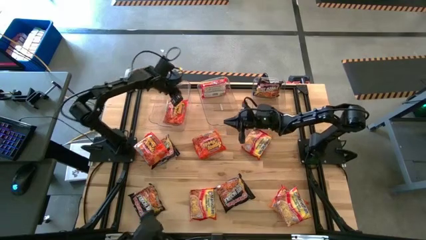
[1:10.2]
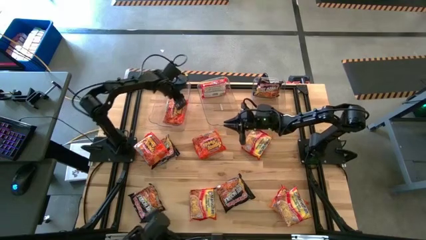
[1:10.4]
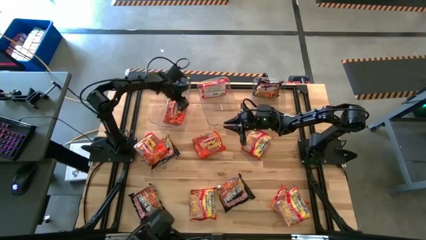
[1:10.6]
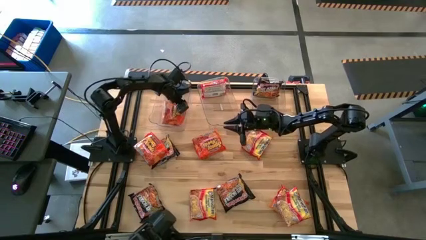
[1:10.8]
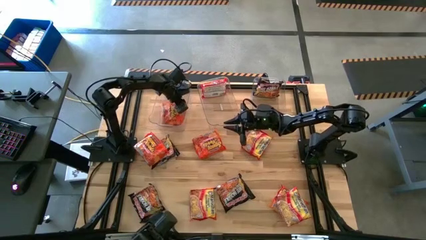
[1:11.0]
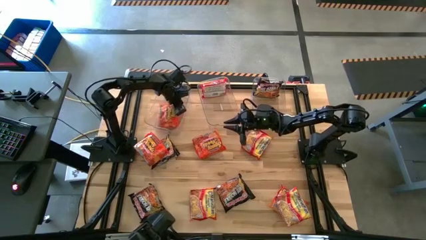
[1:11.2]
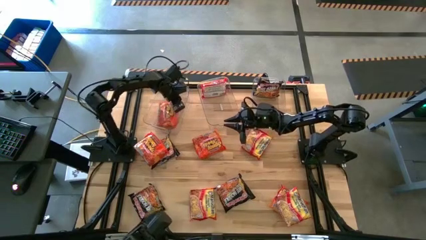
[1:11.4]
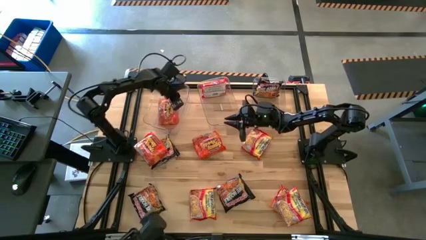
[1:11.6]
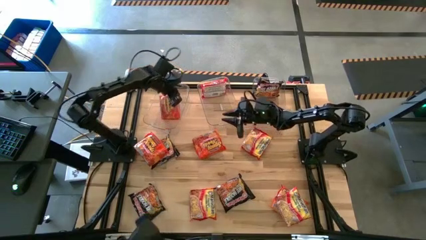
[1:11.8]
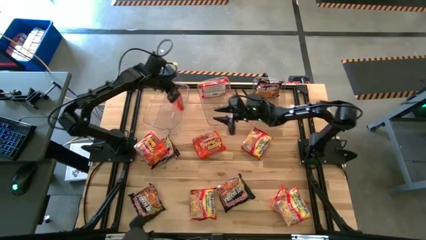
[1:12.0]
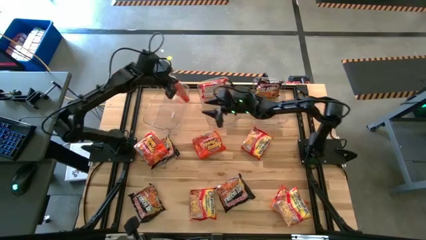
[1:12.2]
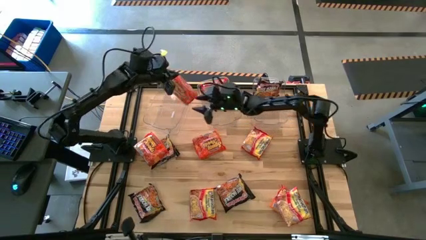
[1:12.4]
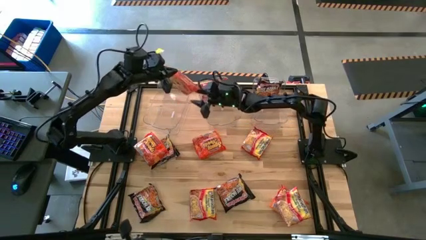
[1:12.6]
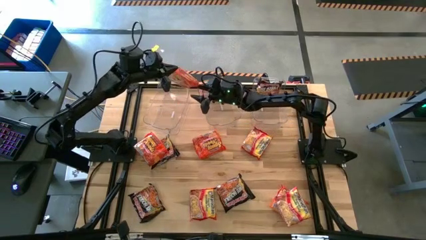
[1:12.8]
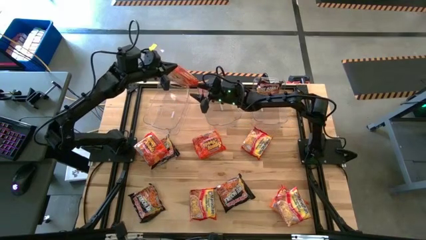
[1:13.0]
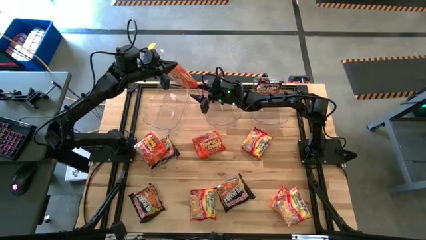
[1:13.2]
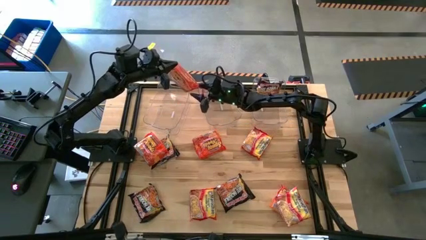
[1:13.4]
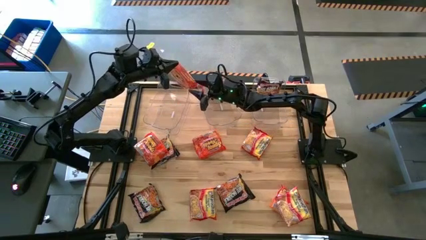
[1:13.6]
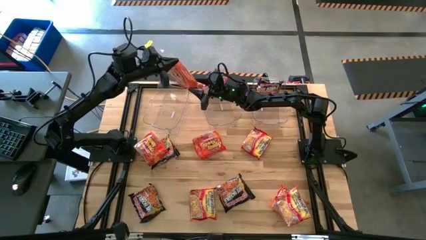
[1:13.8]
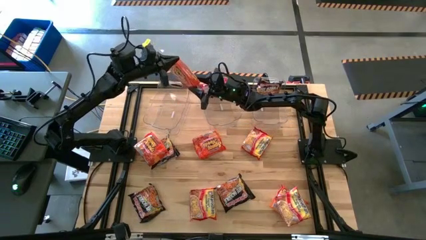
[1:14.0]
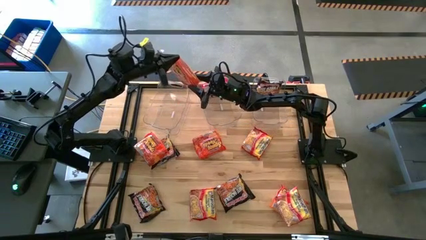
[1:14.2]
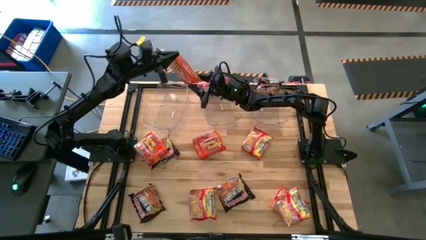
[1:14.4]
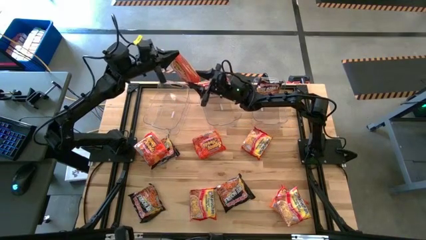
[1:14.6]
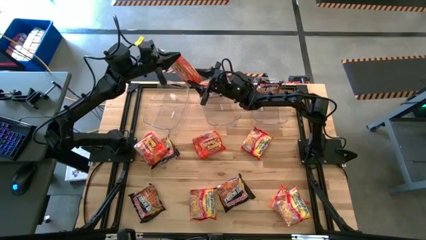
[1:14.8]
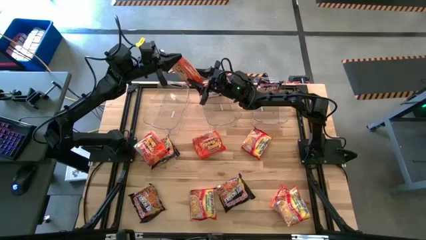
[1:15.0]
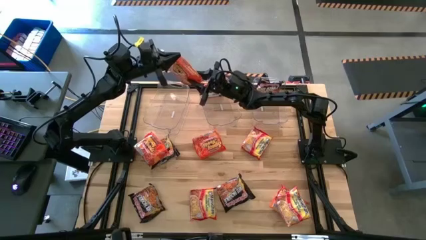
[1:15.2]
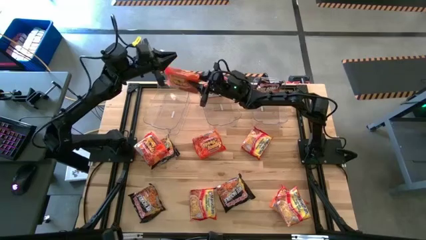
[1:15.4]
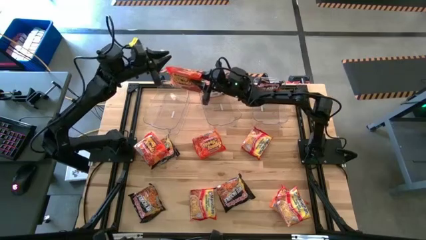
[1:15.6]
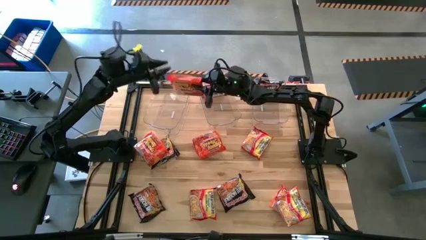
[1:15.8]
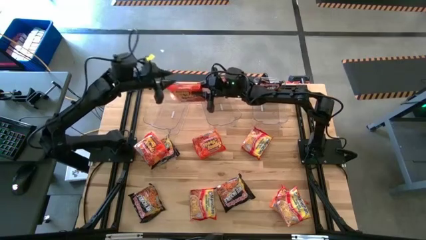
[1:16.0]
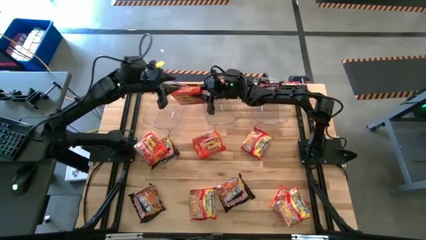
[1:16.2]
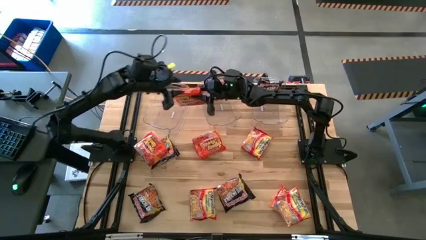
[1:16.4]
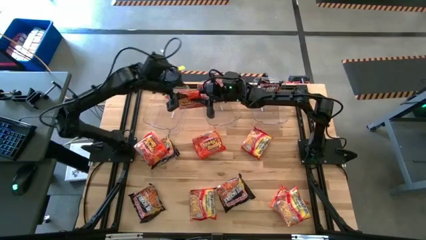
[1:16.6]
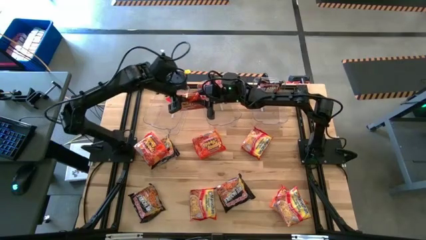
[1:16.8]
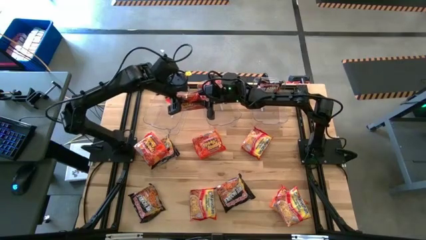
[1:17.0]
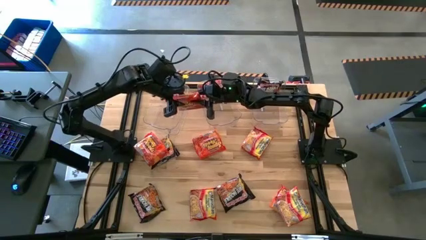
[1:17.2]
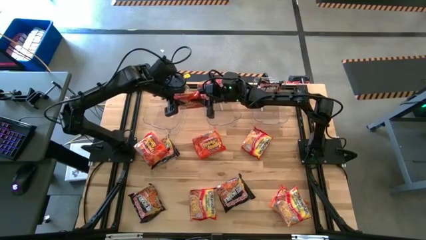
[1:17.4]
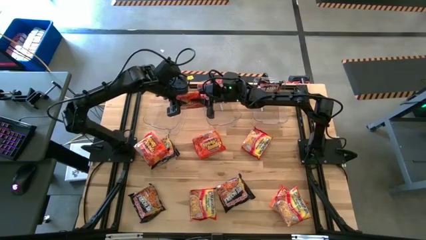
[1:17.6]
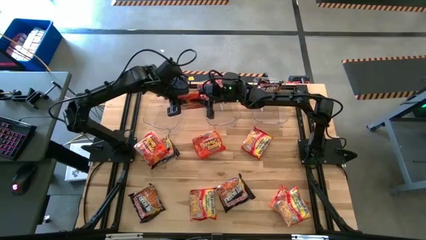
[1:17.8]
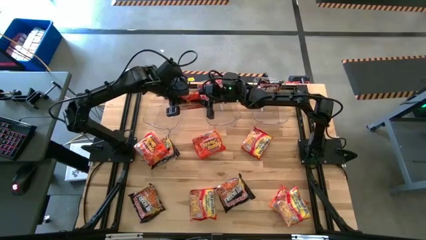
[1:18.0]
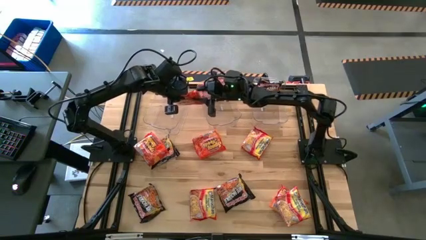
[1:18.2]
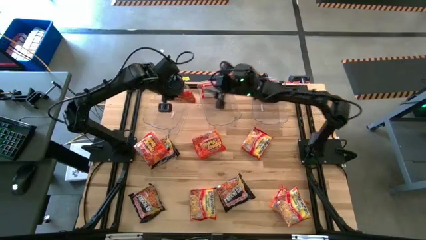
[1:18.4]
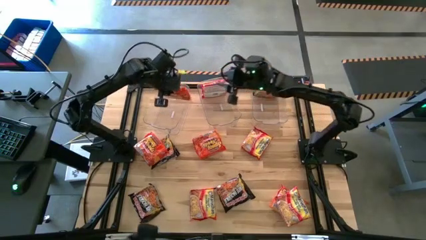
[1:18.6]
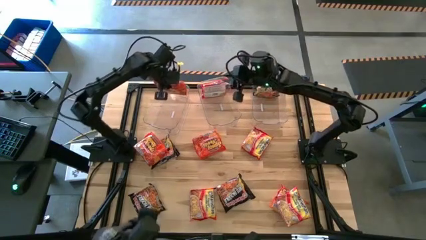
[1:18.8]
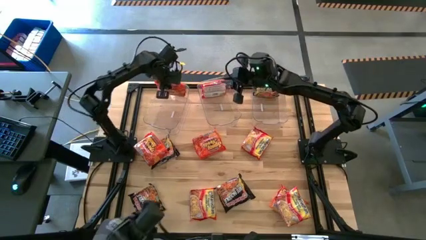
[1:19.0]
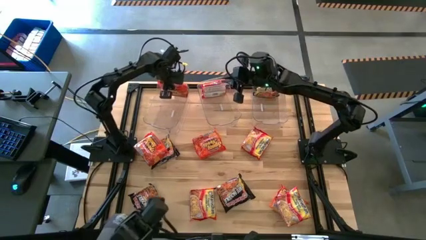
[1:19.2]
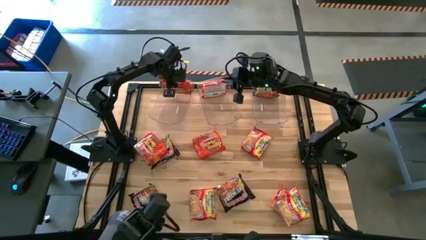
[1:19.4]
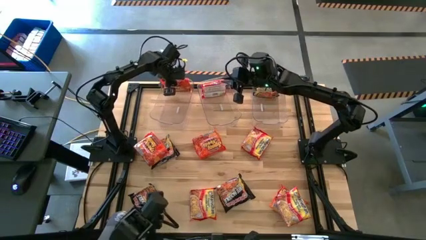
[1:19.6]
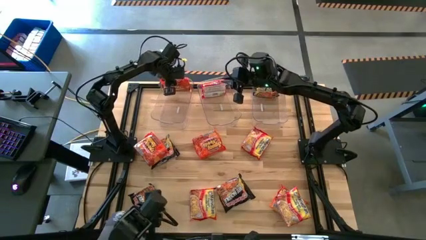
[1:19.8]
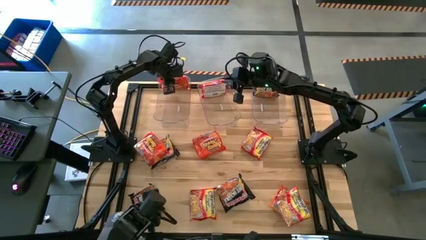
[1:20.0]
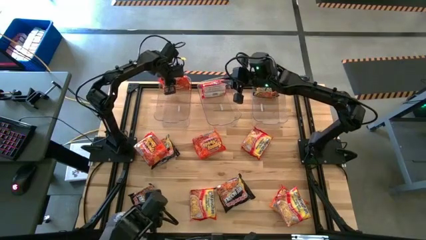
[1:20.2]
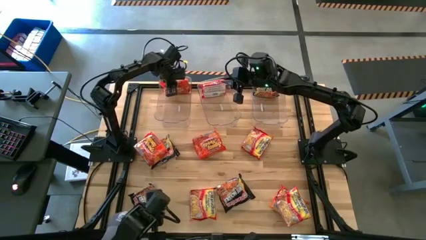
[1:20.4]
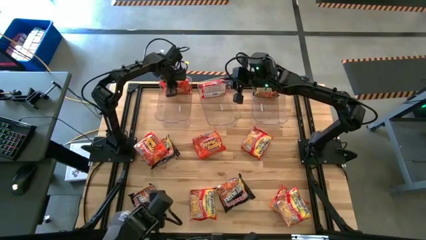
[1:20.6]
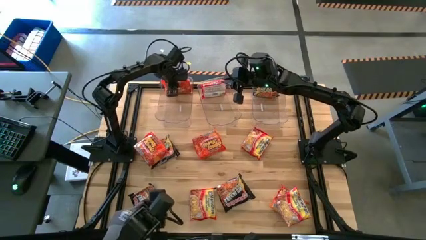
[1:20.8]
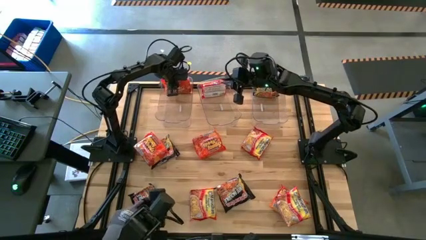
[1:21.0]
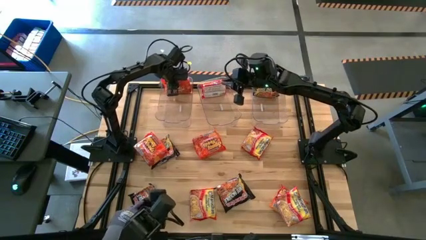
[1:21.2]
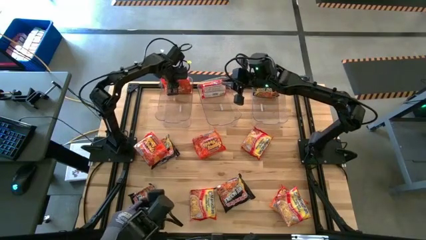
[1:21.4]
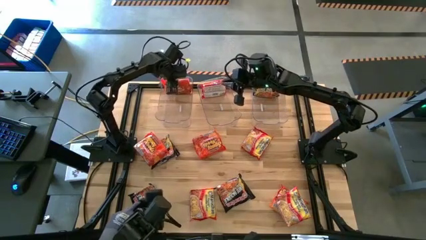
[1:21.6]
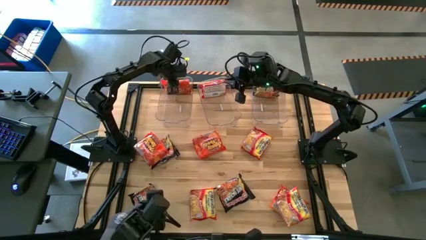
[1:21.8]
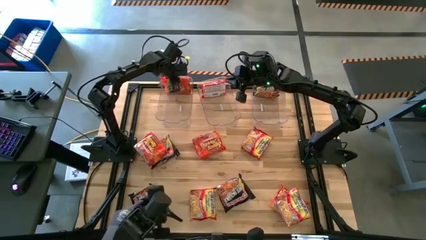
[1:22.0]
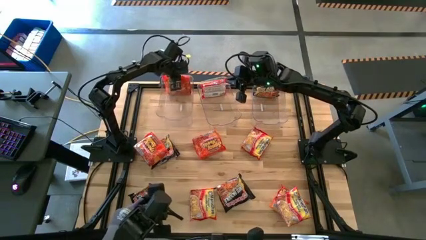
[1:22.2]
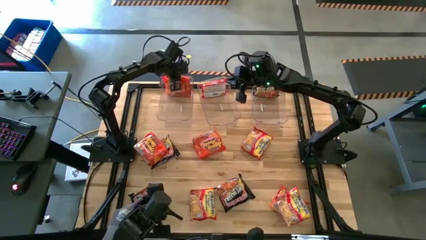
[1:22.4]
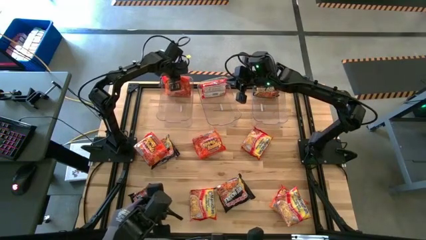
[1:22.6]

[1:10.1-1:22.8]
Task: Sort Maruchan noodles
Put the orange noodle pack into the left transparent bin

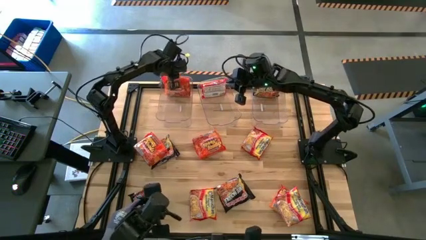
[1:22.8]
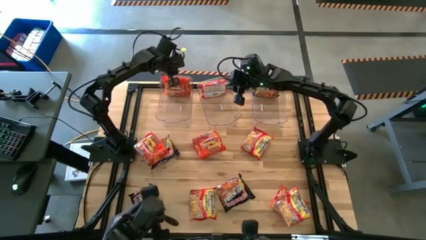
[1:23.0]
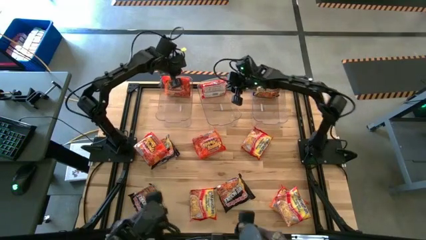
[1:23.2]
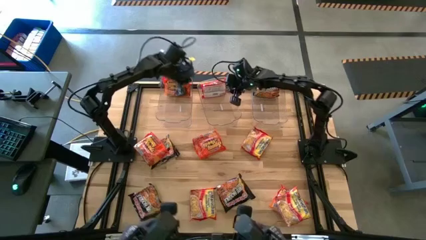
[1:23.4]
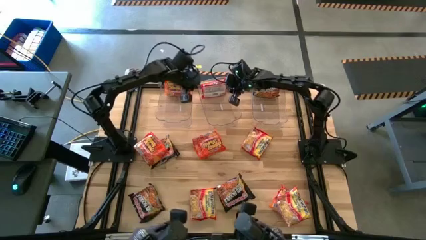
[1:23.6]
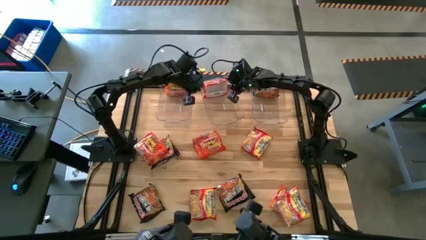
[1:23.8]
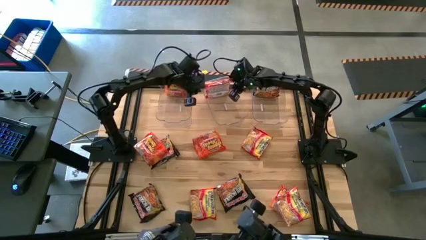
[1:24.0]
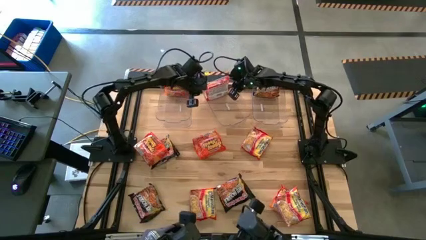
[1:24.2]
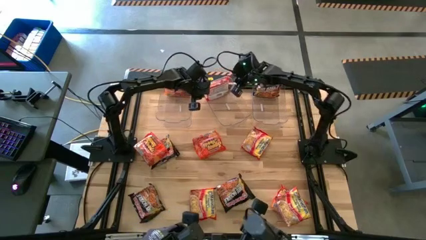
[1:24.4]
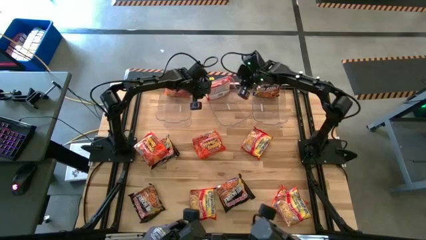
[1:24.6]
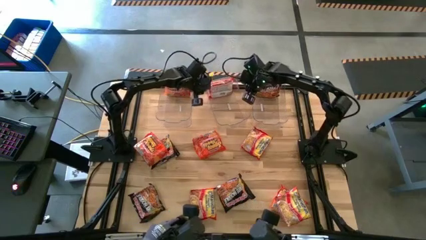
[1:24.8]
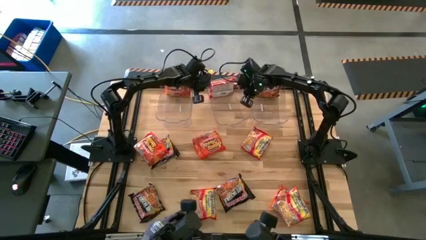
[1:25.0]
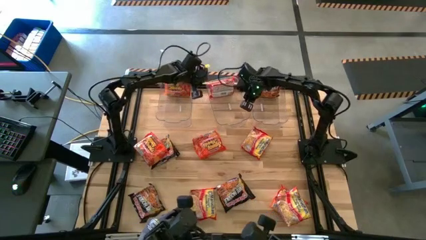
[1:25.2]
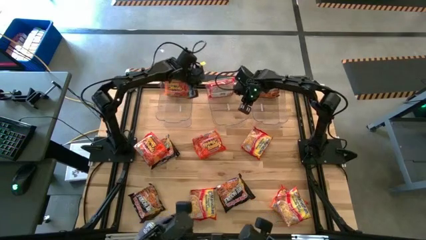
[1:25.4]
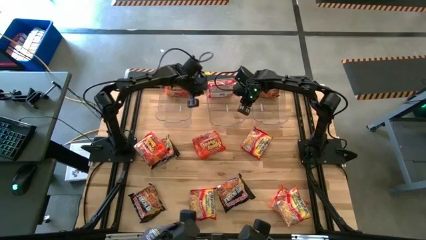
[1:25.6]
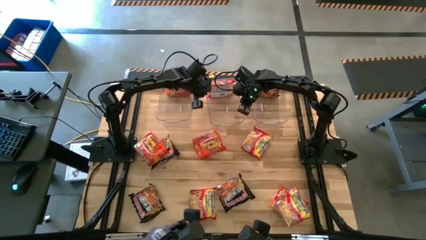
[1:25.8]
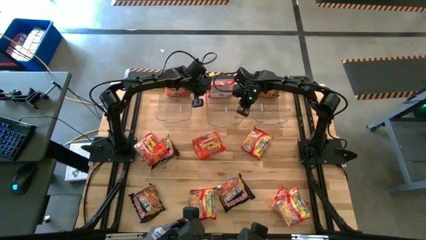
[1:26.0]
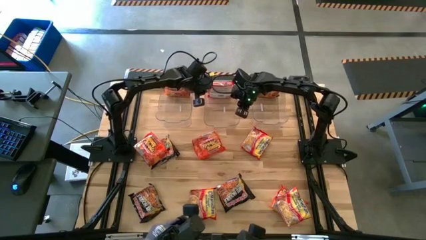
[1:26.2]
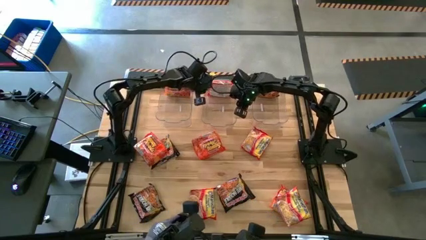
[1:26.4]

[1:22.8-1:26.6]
Adjust the middle transparent bin on the table
